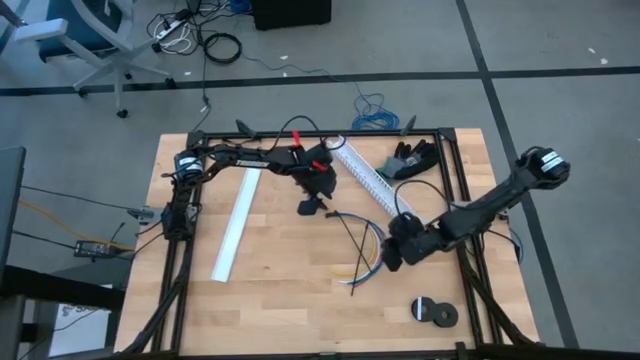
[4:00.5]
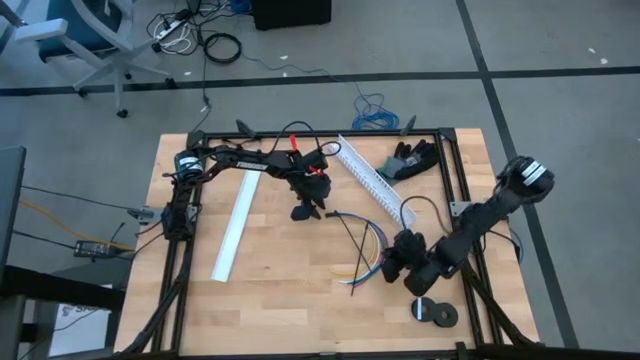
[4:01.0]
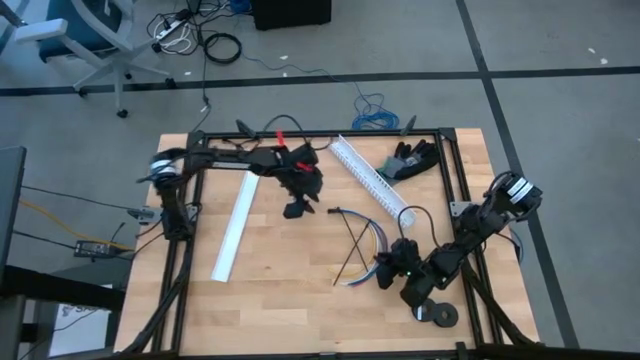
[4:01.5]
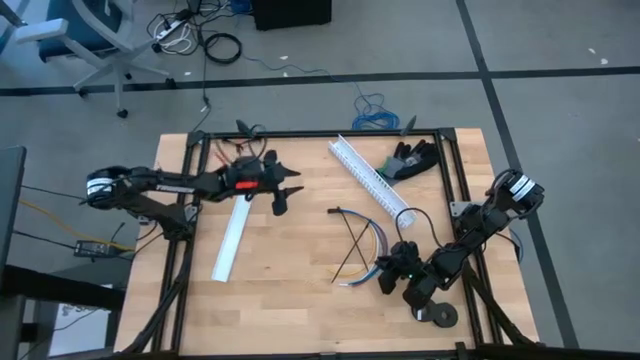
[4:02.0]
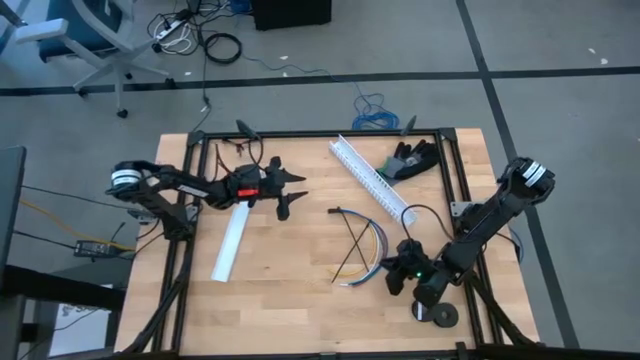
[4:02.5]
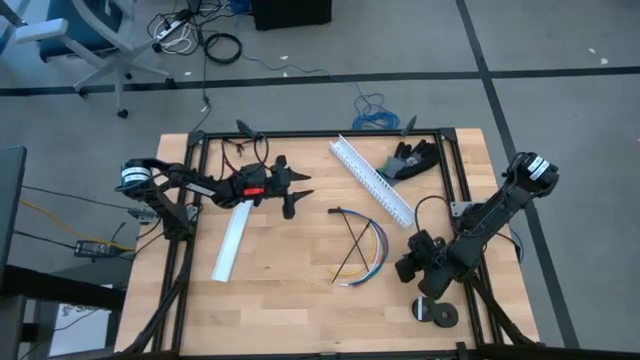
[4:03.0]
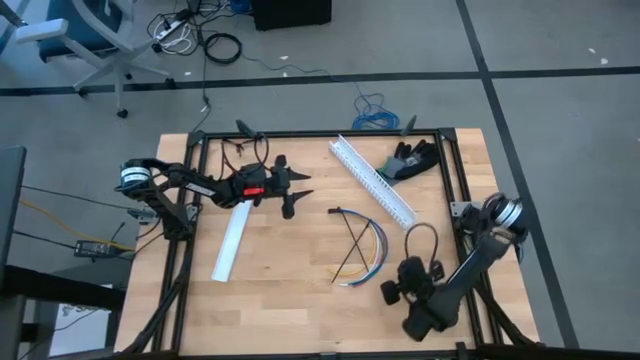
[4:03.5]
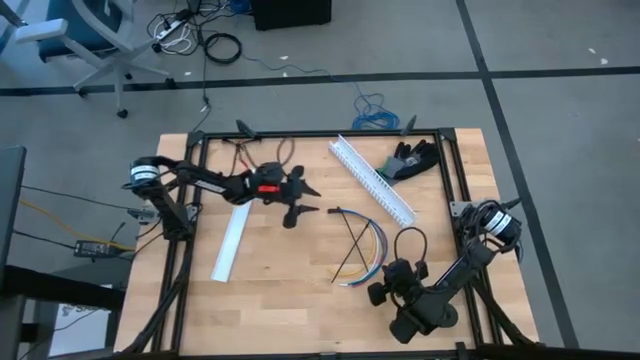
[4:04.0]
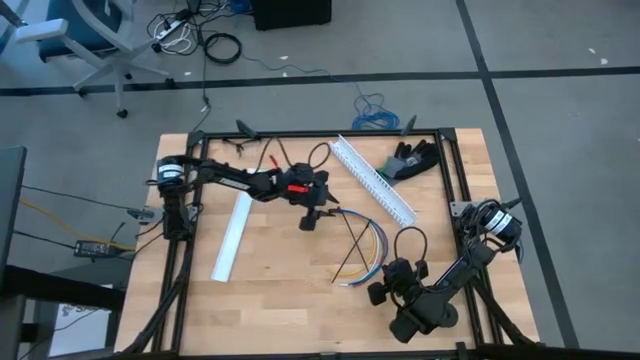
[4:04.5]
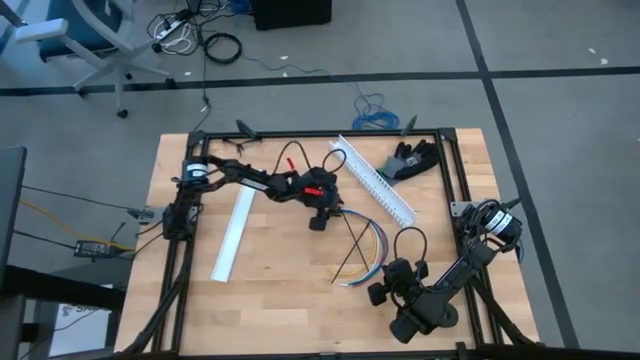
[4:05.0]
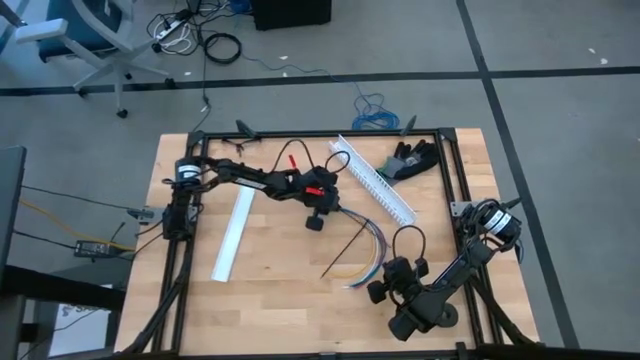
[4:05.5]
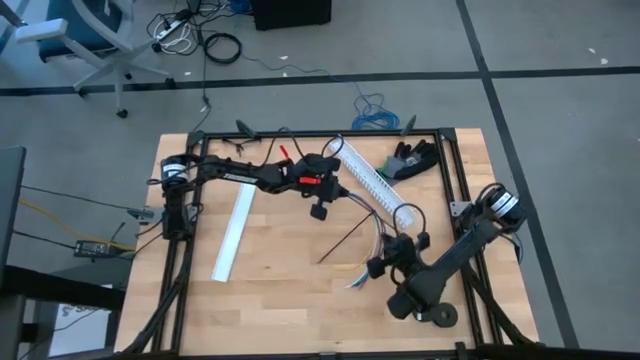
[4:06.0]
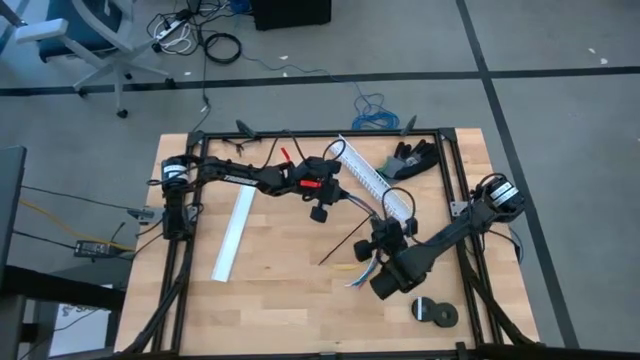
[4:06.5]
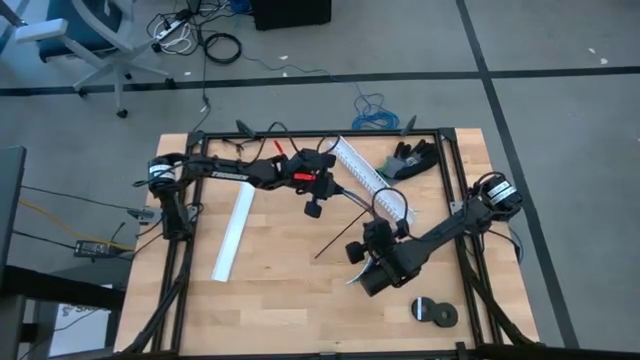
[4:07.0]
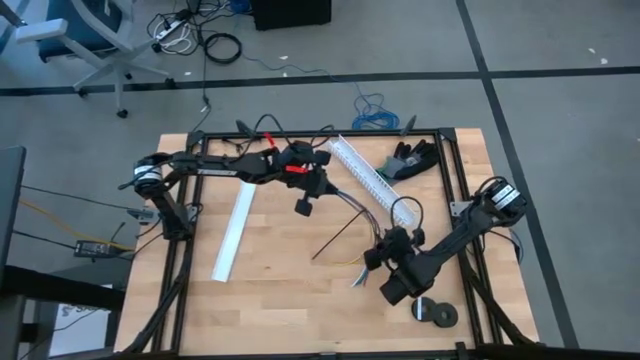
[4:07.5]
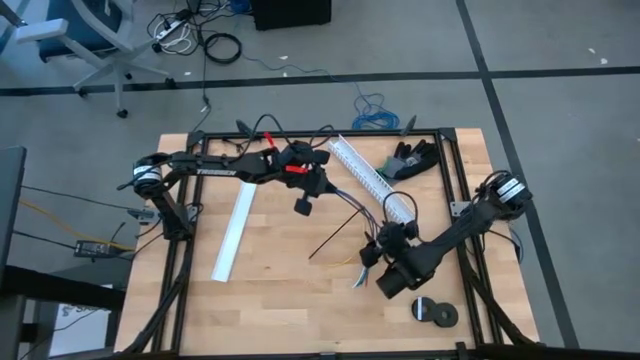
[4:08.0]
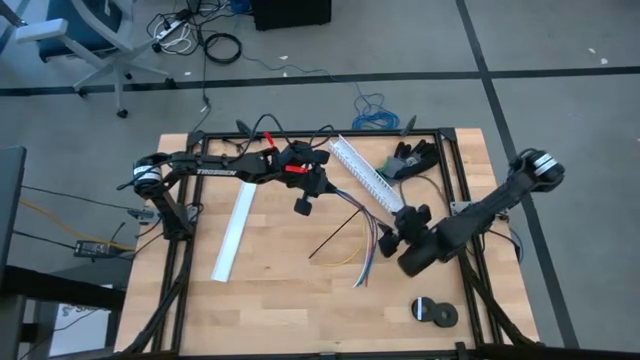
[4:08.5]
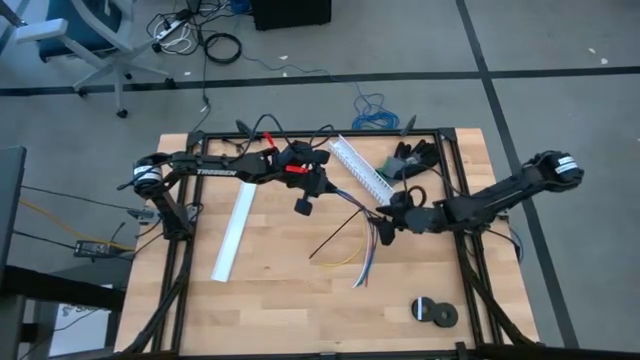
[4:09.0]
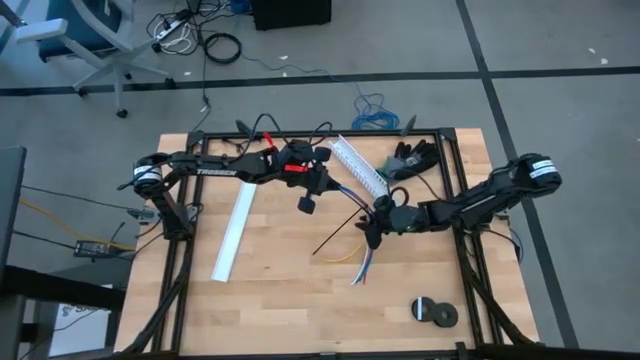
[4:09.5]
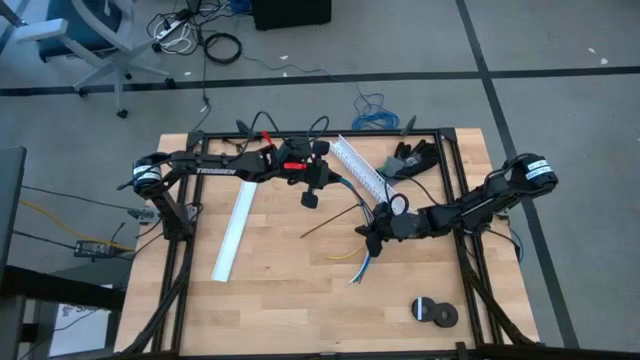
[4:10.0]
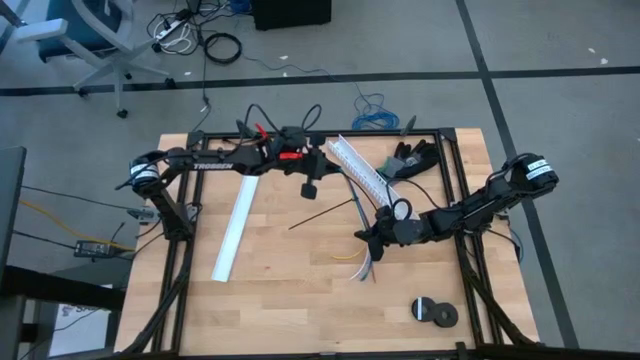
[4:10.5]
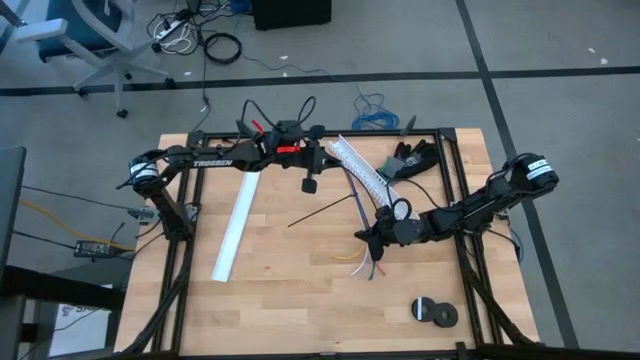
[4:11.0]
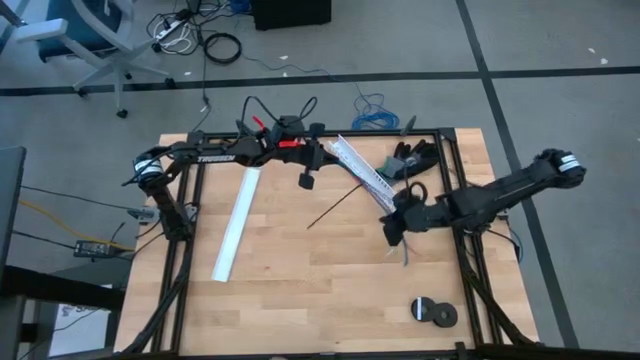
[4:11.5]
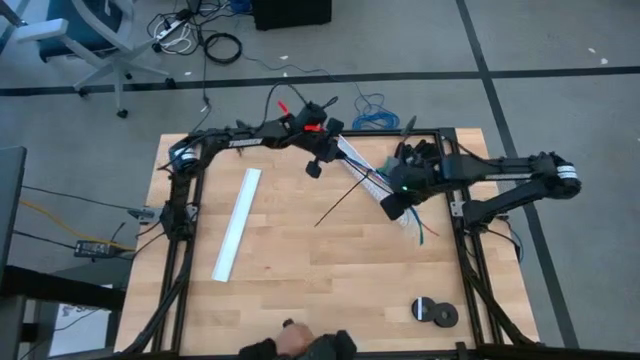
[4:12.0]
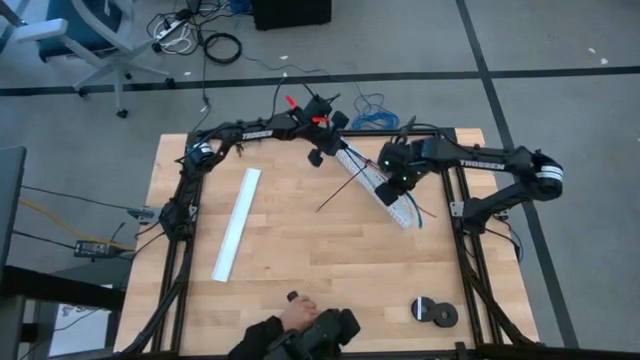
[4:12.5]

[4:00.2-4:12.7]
Task: Ziptie cables
Put the cable wires into the white cable duct

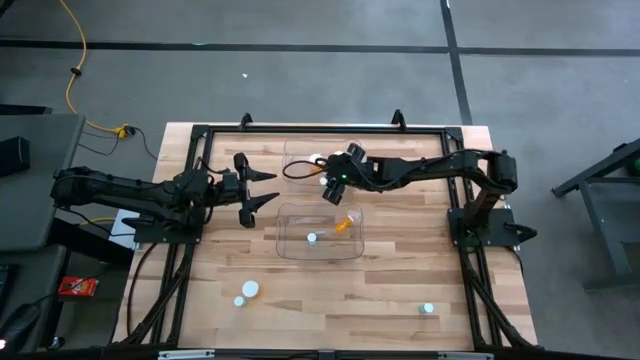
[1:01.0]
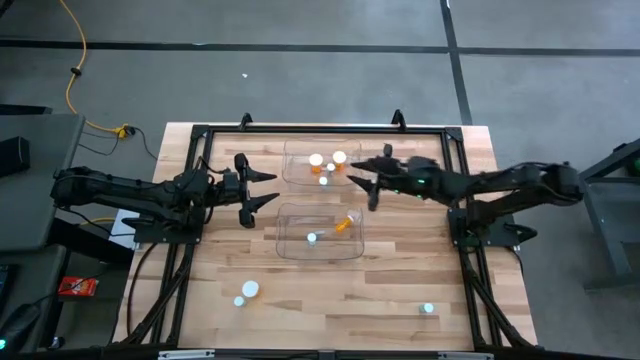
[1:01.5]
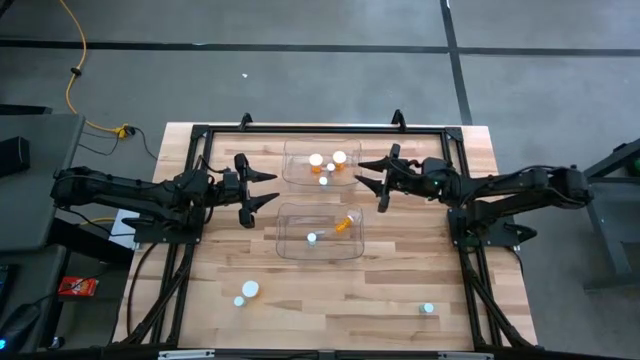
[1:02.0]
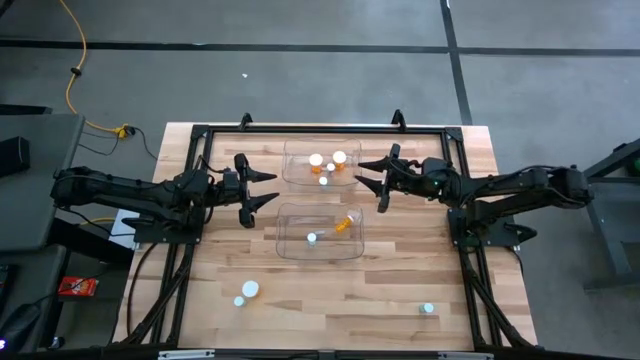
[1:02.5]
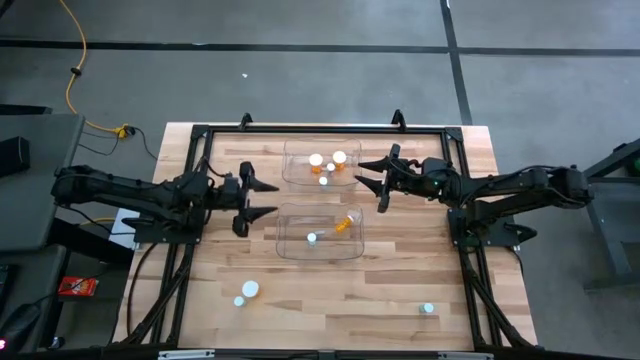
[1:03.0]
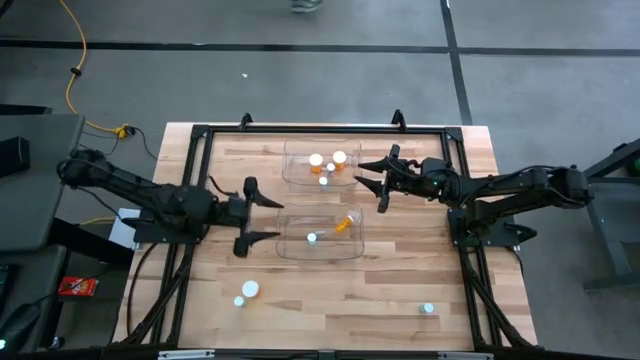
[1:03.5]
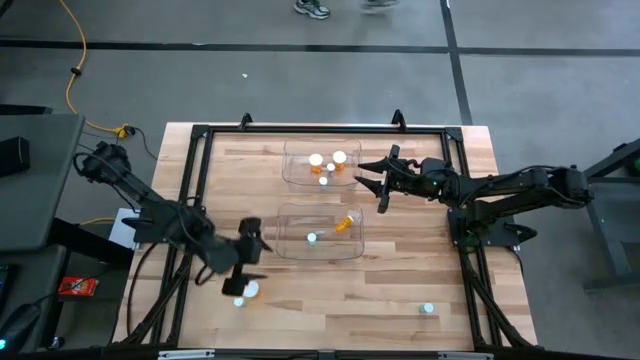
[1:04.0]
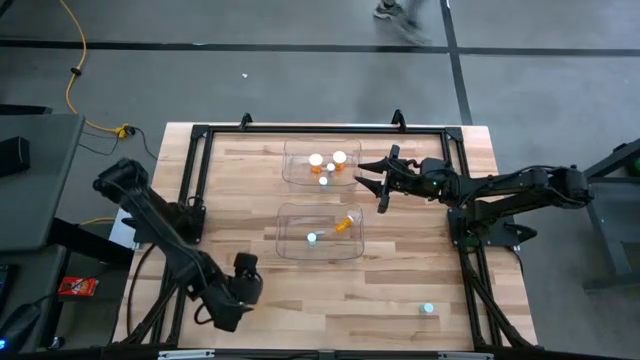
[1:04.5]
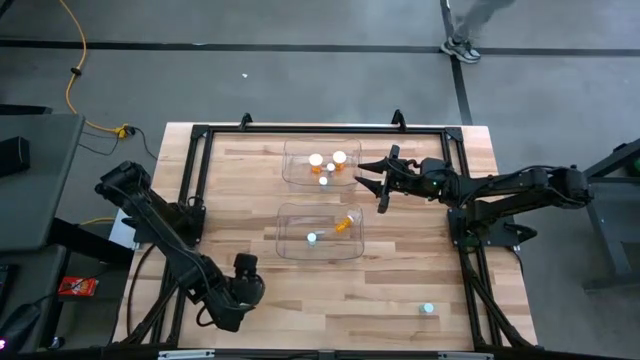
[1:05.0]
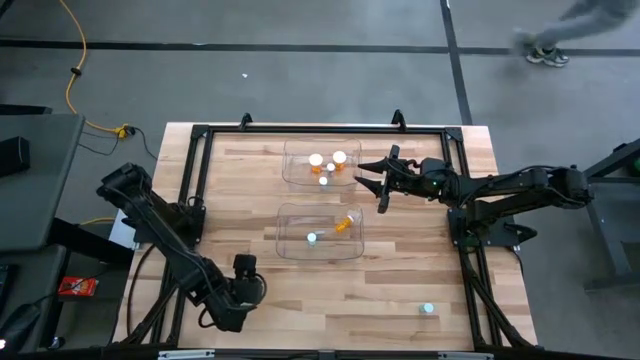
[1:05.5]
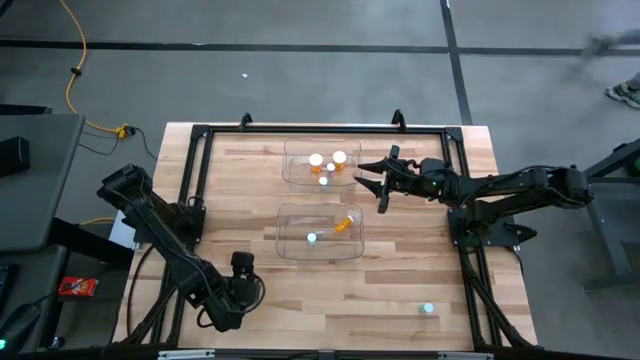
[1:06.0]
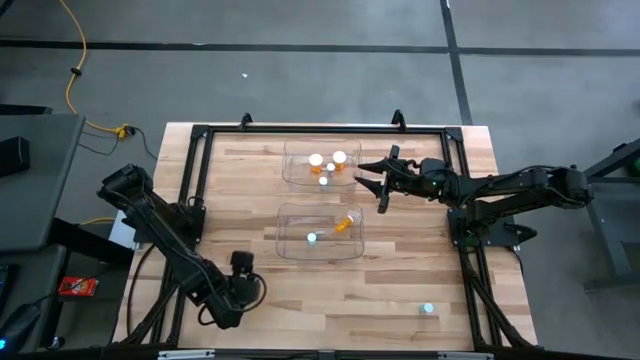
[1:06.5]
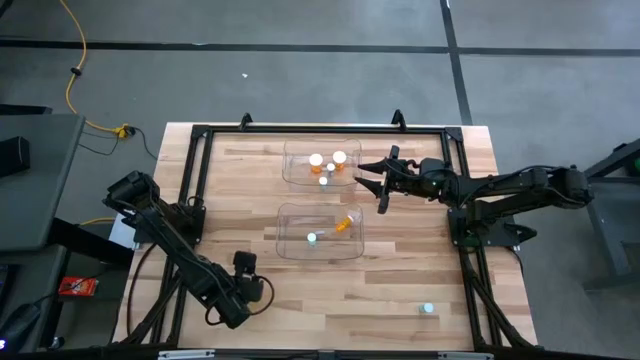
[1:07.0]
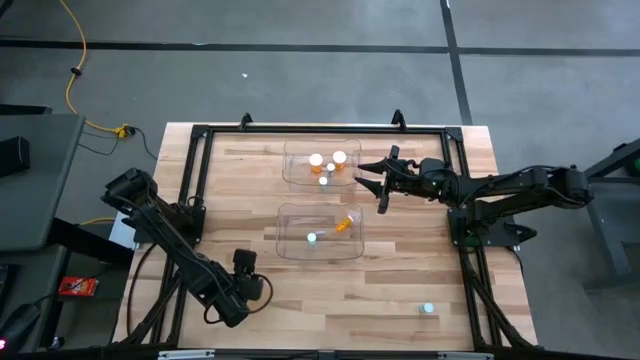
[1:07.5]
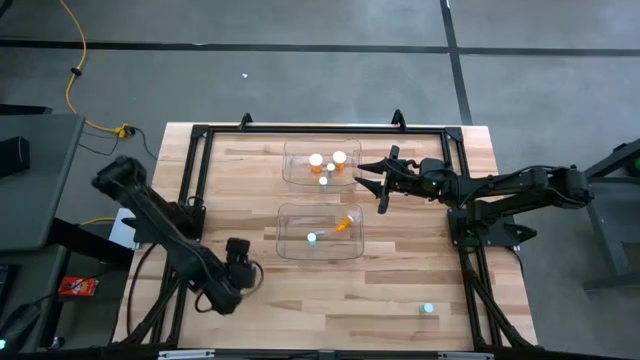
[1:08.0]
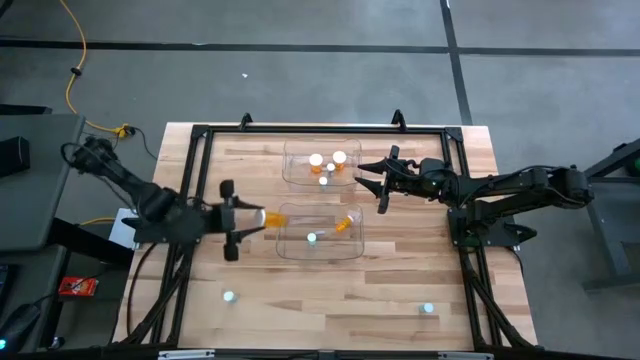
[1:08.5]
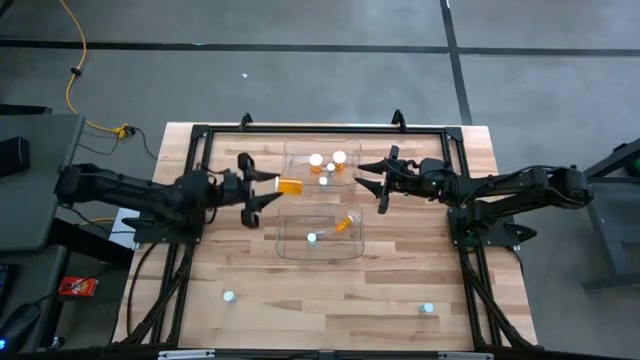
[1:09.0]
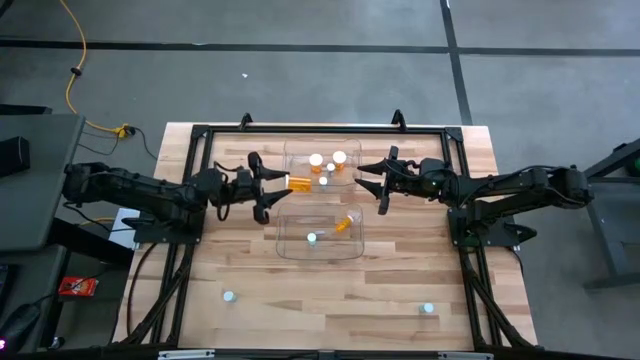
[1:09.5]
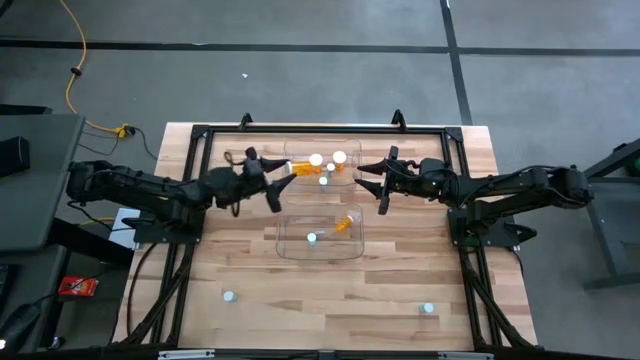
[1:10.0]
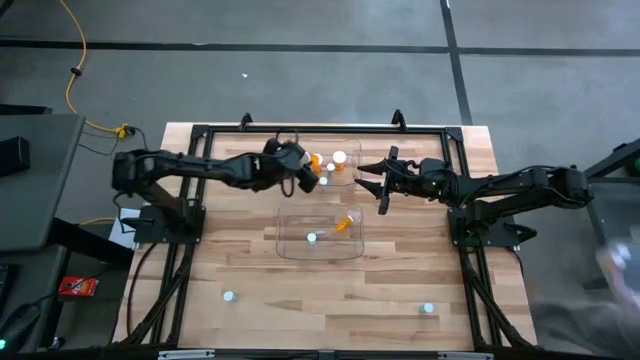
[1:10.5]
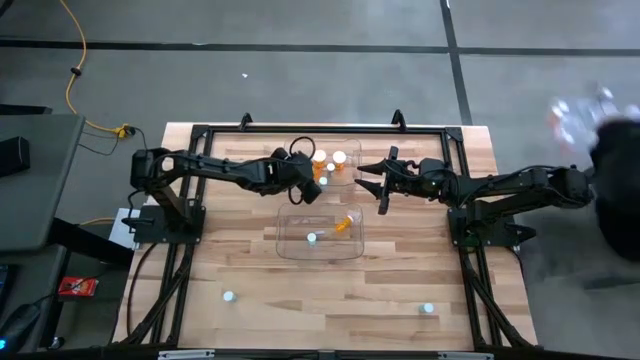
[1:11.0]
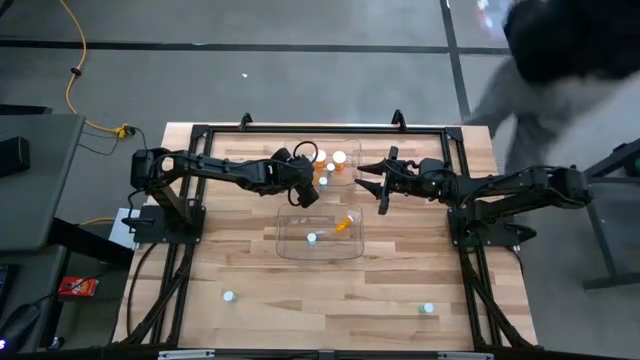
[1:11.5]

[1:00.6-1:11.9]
Task: Pick and place medicine bottles into bin by pill shape (circle, oval)
Put the orange capsule bottle into the top transparent bin
